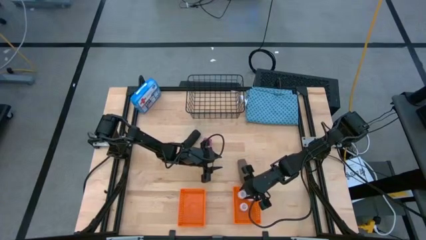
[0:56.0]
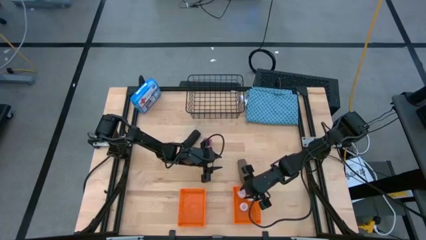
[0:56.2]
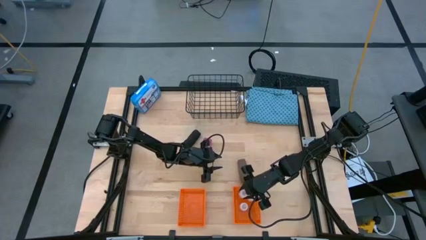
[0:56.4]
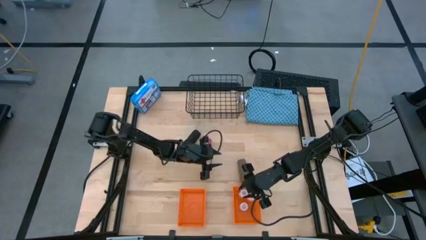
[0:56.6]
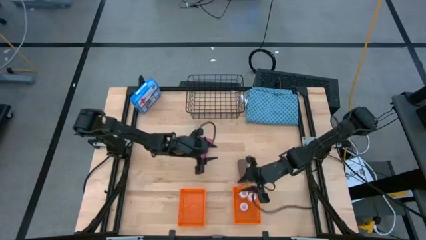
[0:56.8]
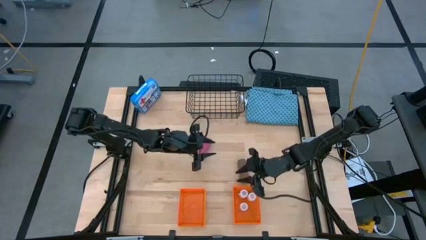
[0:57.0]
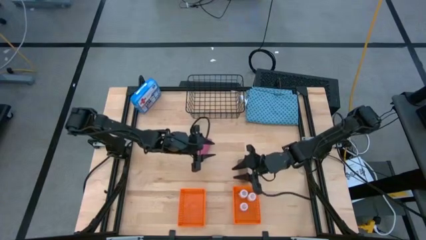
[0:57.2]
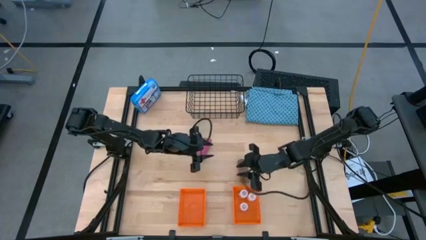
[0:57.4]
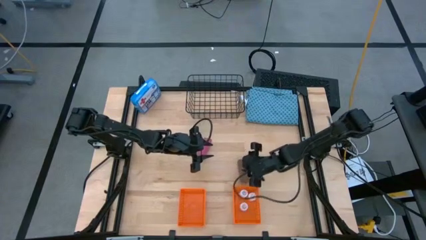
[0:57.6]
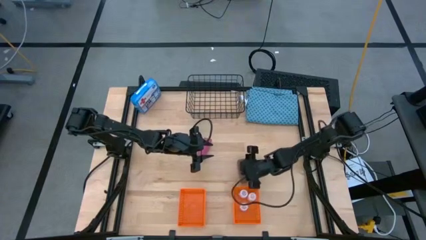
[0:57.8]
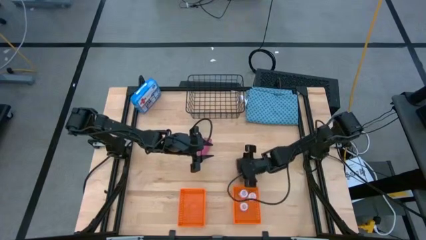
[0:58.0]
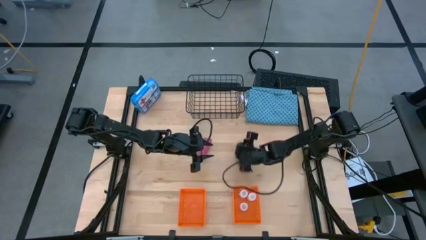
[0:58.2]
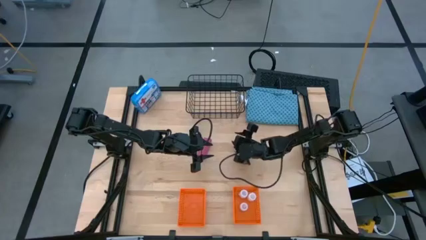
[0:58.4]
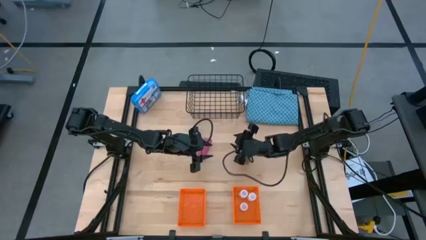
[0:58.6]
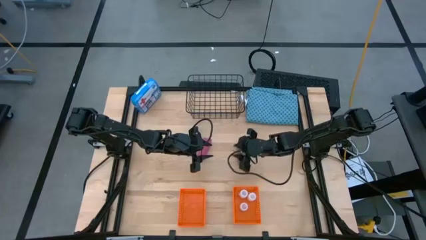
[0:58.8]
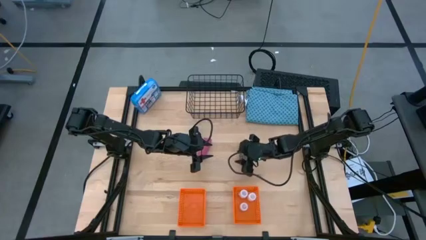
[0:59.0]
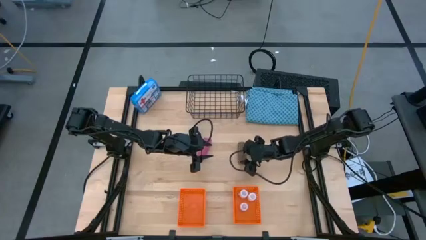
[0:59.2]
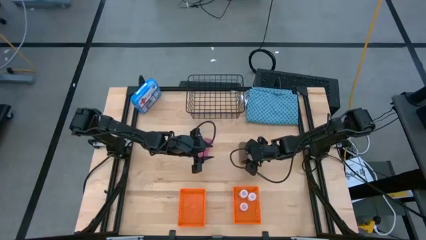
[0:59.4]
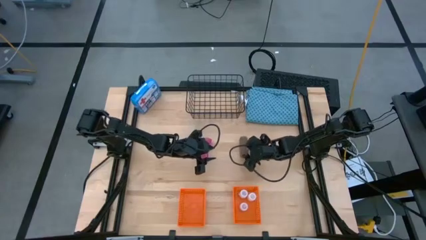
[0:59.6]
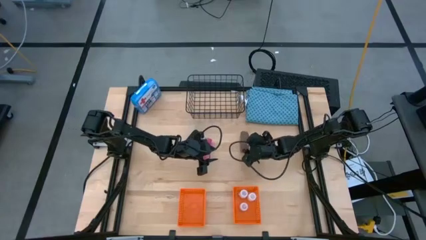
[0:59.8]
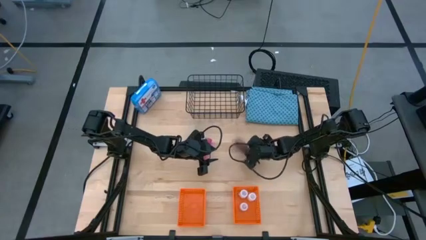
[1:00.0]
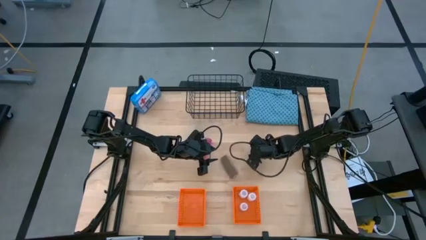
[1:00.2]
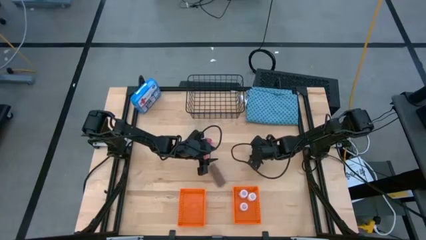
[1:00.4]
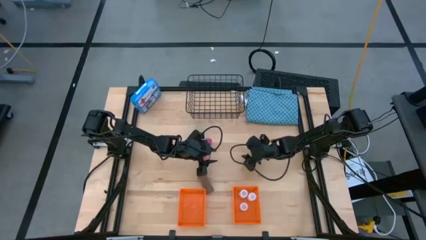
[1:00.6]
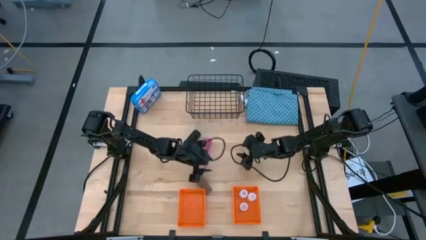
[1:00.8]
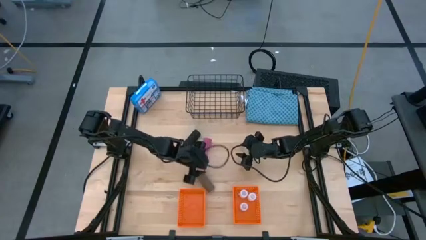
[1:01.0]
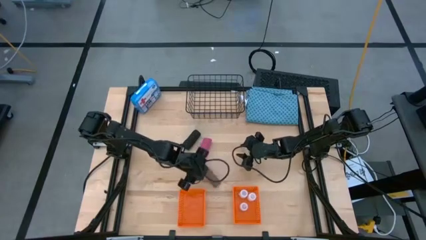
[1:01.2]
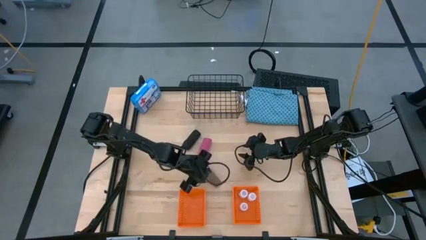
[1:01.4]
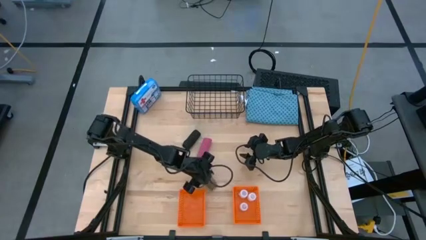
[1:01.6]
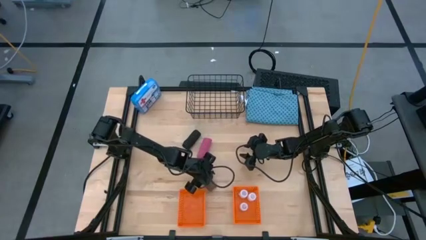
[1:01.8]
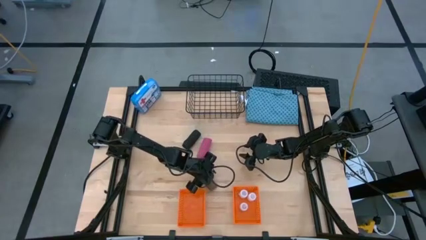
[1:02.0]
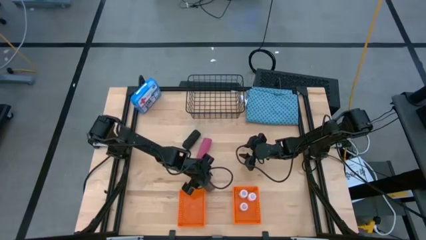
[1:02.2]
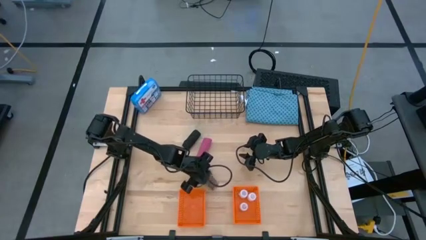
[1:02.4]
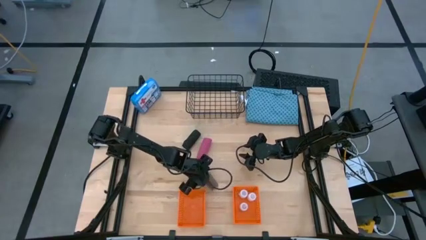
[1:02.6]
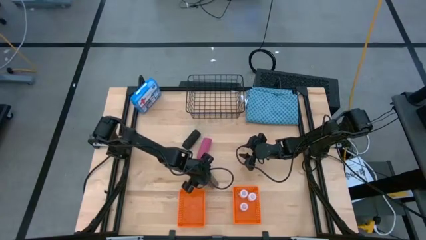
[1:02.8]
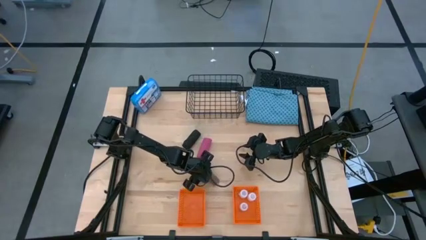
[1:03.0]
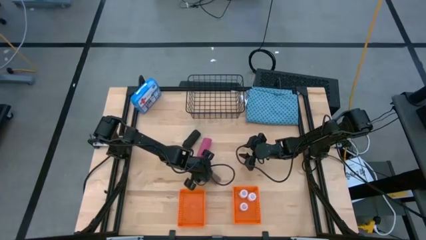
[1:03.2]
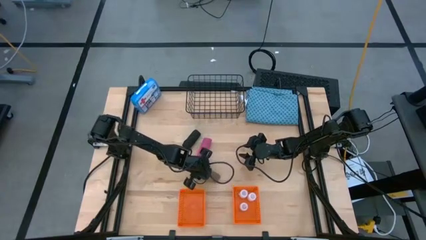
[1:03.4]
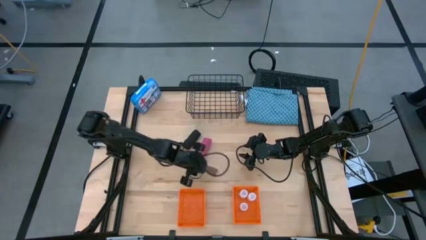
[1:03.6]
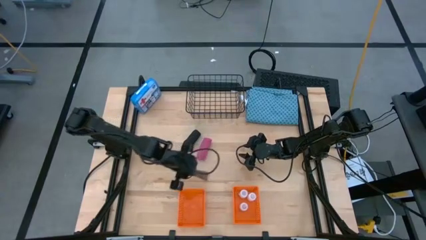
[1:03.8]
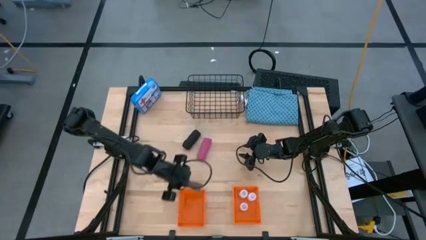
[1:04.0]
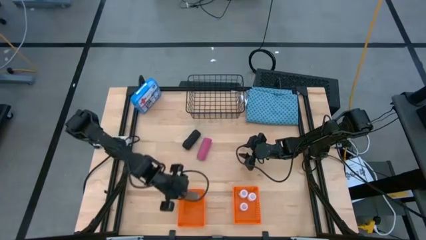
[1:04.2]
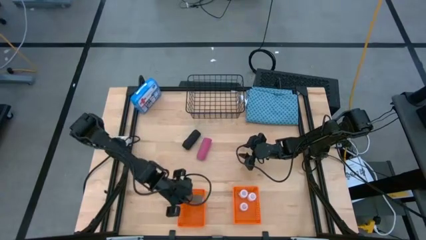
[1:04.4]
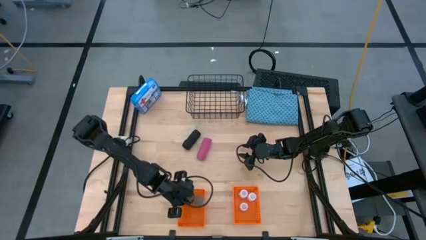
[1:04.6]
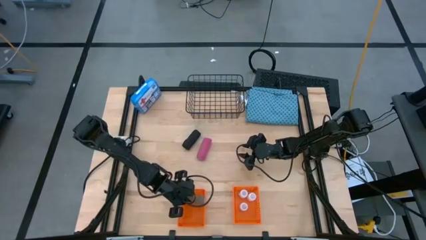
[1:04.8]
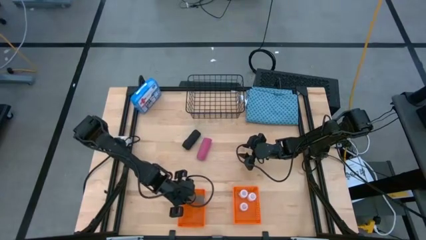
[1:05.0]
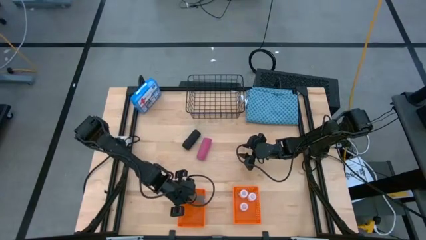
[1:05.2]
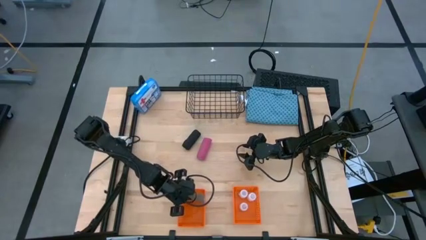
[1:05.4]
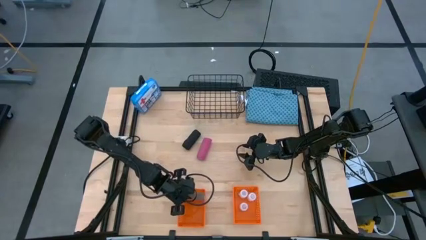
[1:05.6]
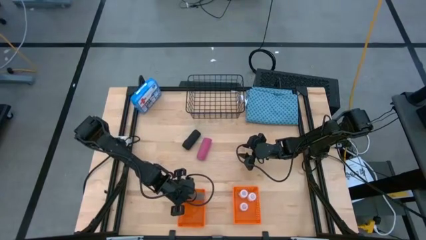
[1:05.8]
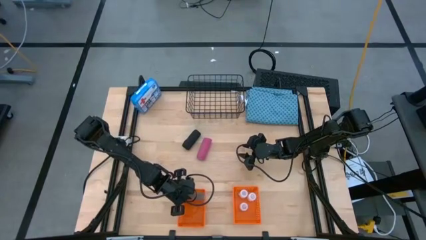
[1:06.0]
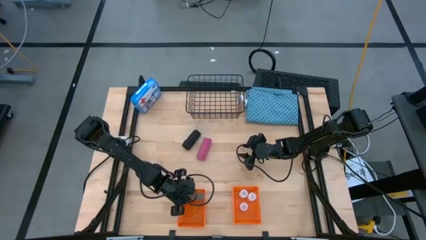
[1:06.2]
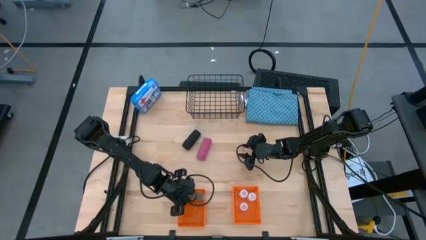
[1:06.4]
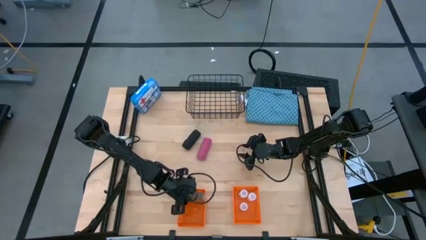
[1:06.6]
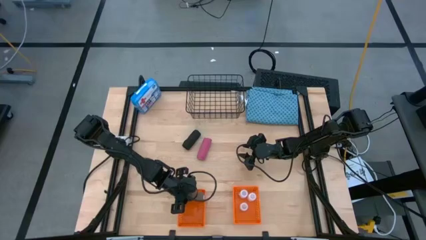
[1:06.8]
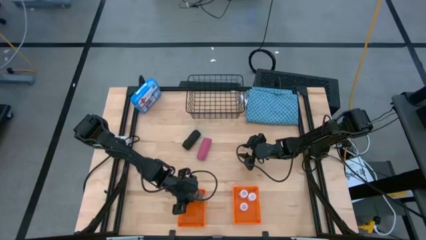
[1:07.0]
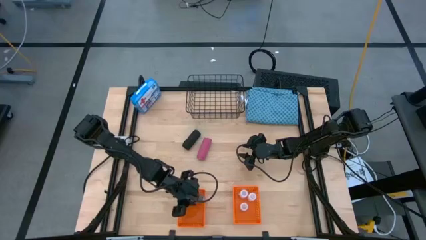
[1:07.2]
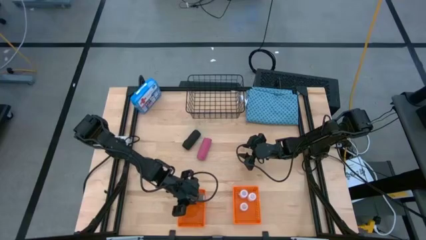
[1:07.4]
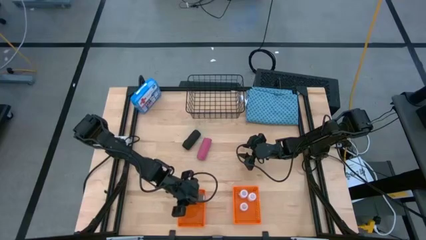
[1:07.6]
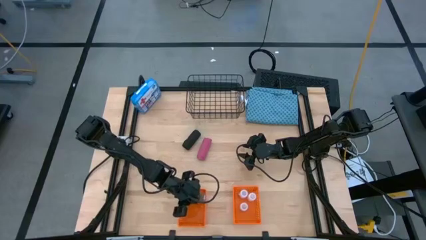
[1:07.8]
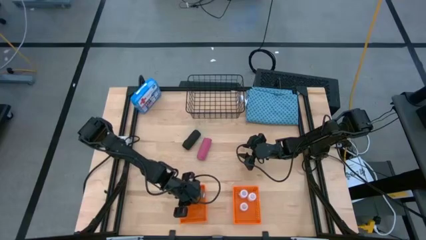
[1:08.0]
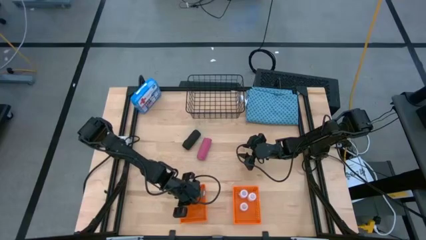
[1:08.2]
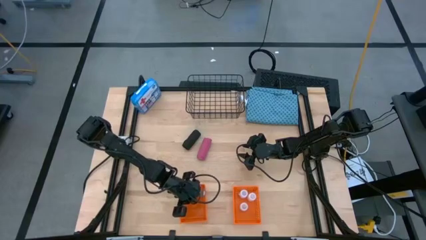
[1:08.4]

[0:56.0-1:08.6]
Task: Pick & Place Medicine items
Put the brown bandage into the left orange basket

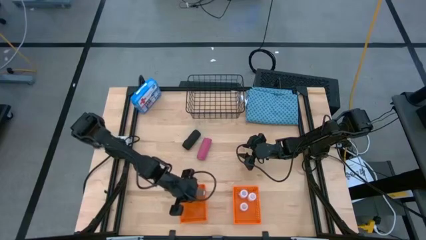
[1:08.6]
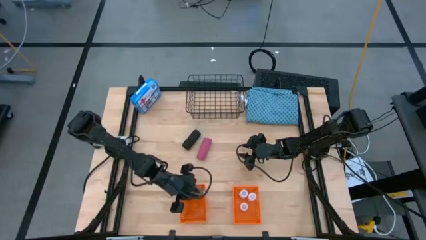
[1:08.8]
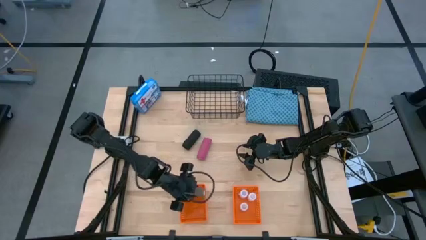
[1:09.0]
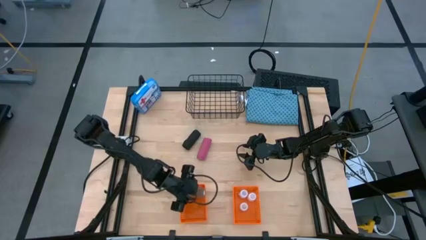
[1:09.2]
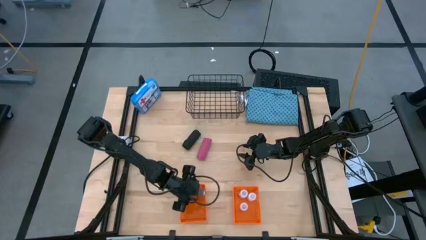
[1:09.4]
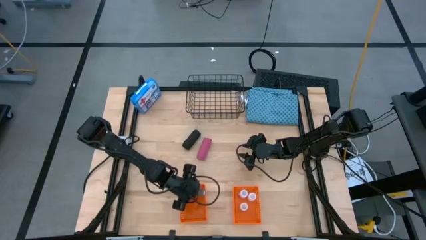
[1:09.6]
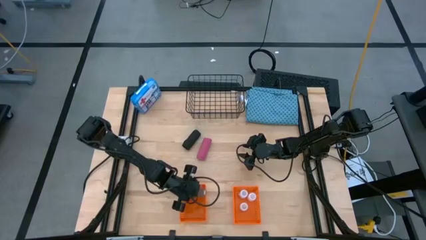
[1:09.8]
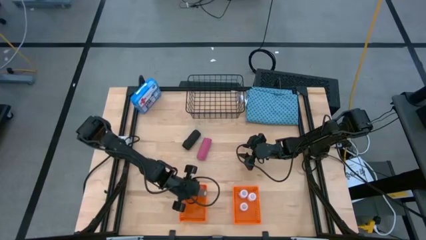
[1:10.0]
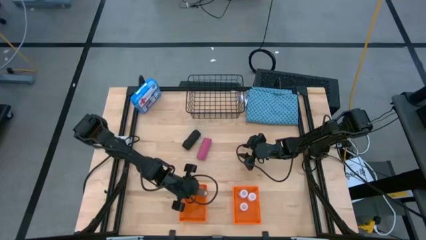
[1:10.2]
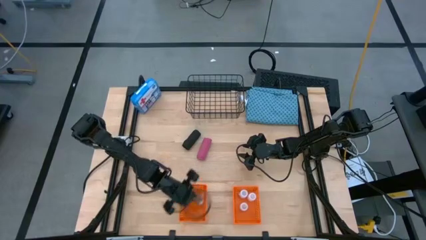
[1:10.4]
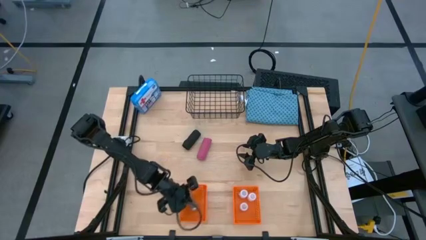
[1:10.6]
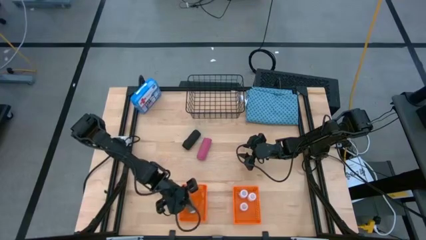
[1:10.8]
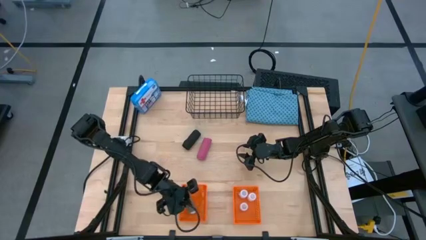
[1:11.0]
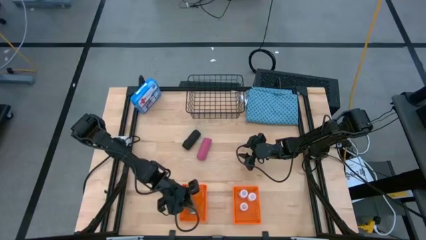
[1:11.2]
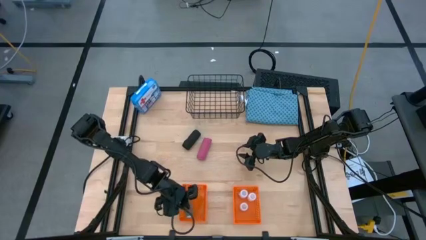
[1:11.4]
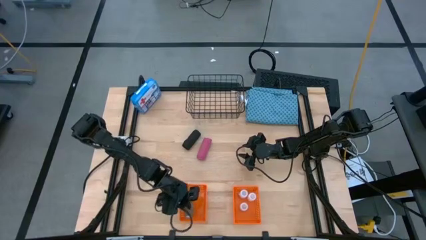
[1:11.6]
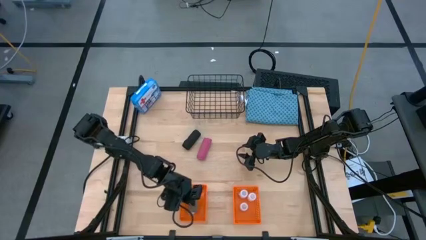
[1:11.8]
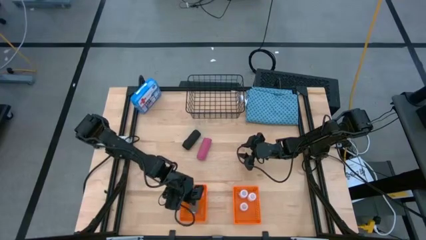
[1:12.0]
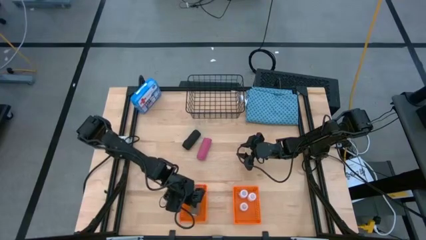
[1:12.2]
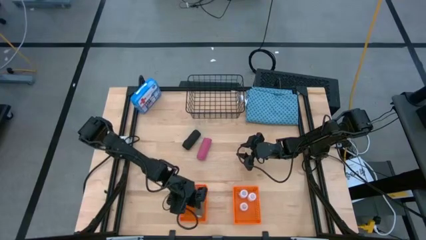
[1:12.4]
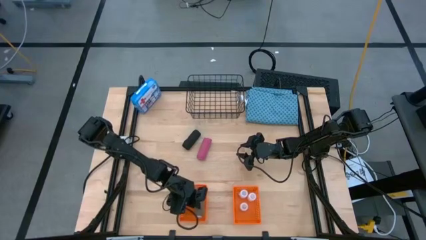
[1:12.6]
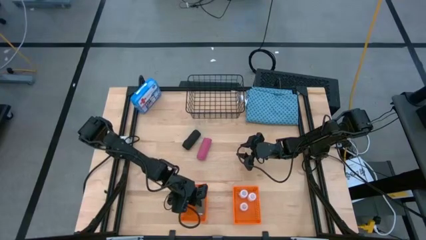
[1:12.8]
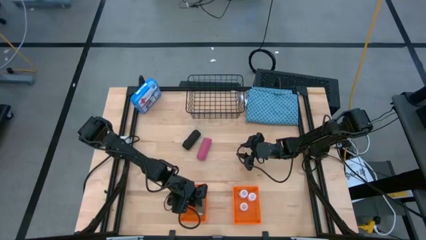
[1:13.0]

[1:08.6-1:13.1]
Put the brown bandage into the left orange basket
